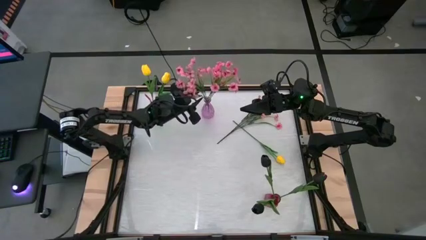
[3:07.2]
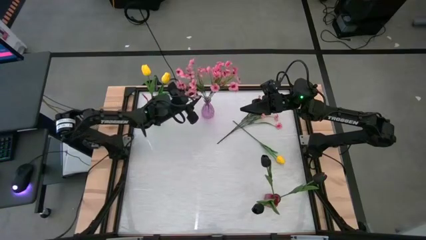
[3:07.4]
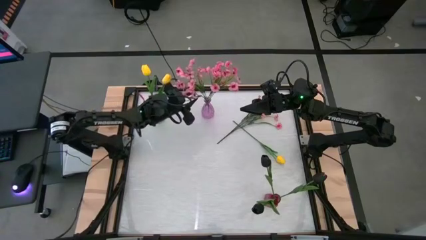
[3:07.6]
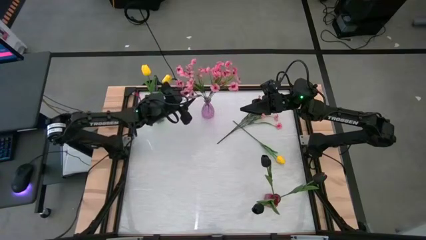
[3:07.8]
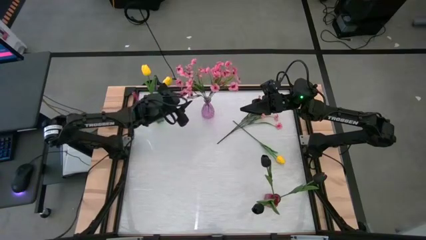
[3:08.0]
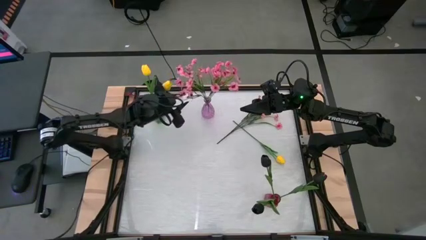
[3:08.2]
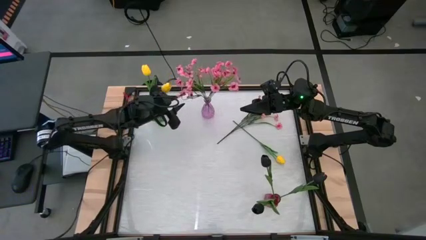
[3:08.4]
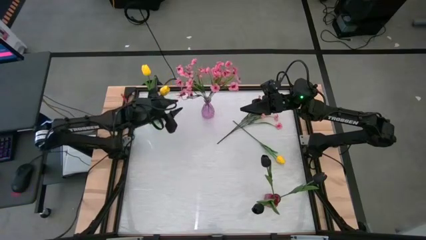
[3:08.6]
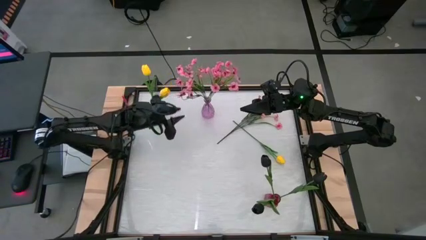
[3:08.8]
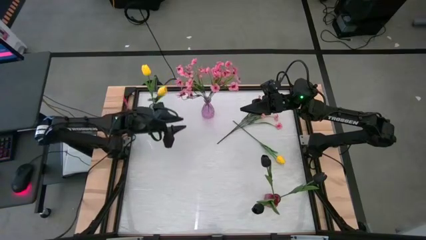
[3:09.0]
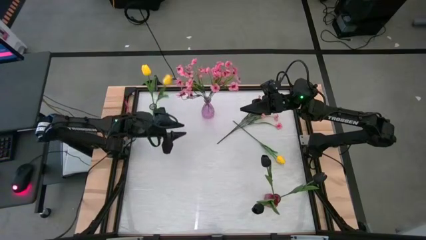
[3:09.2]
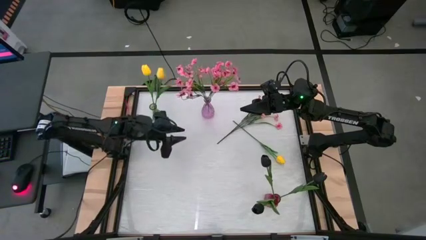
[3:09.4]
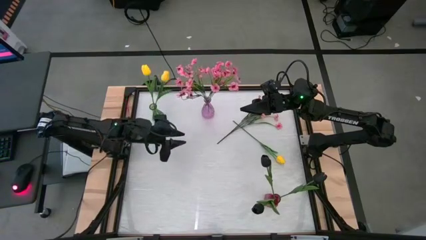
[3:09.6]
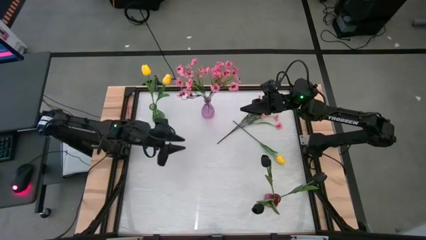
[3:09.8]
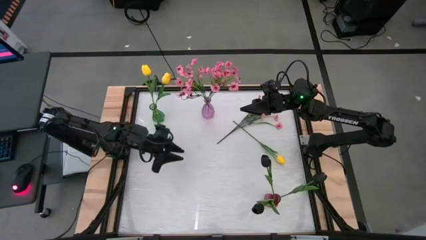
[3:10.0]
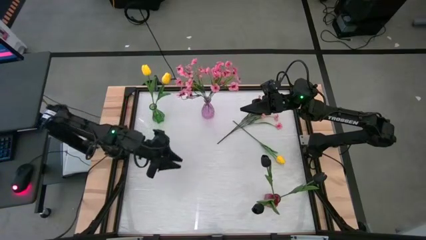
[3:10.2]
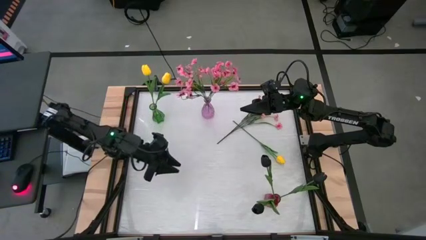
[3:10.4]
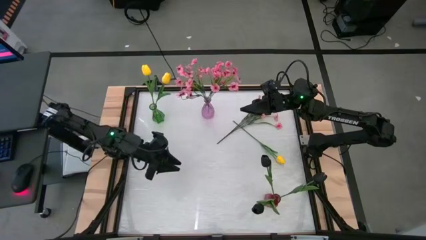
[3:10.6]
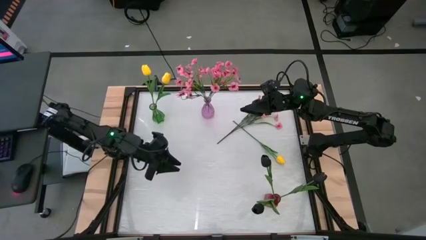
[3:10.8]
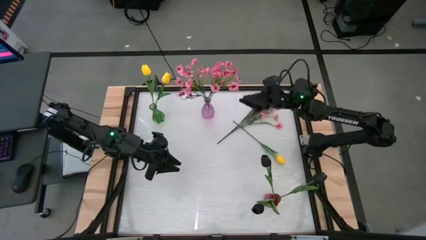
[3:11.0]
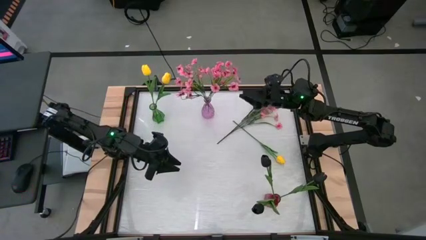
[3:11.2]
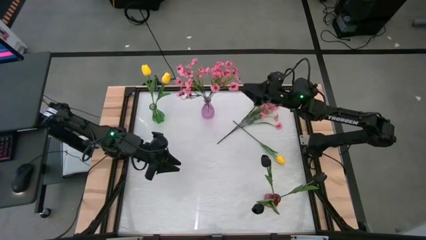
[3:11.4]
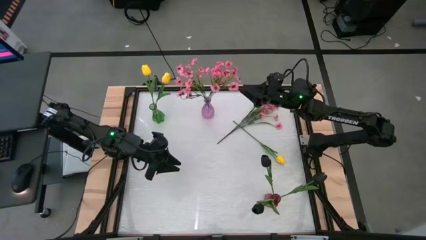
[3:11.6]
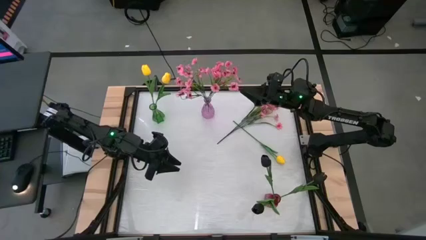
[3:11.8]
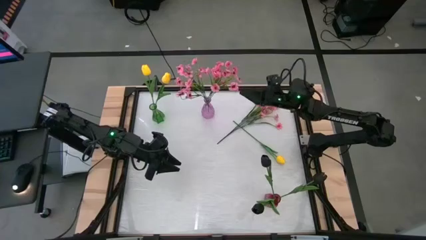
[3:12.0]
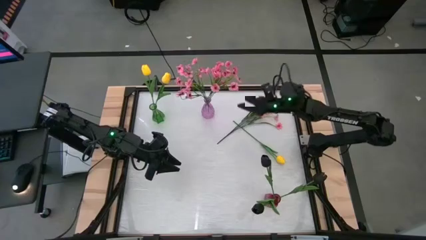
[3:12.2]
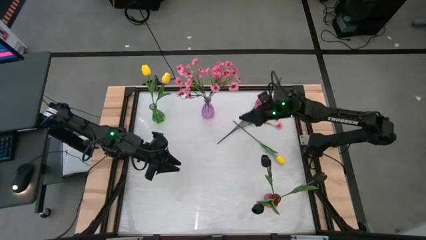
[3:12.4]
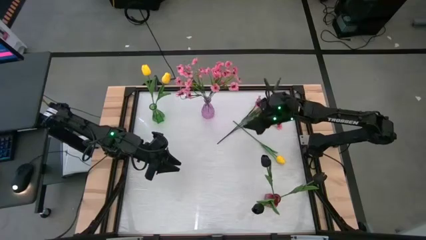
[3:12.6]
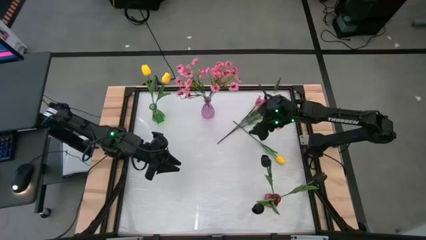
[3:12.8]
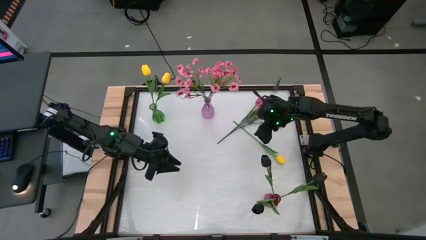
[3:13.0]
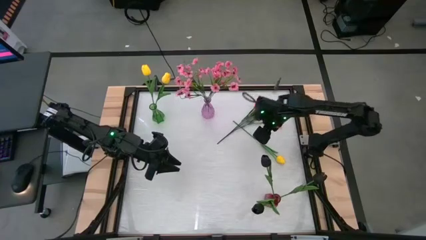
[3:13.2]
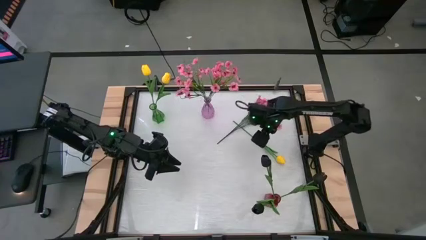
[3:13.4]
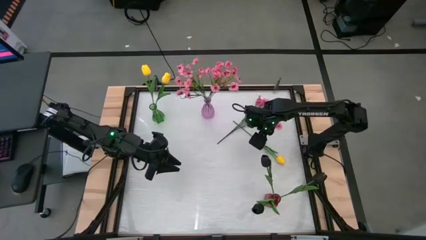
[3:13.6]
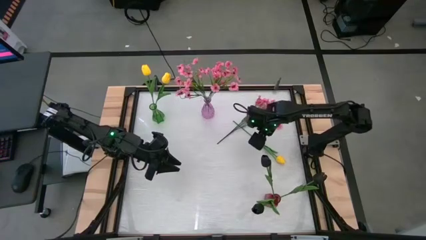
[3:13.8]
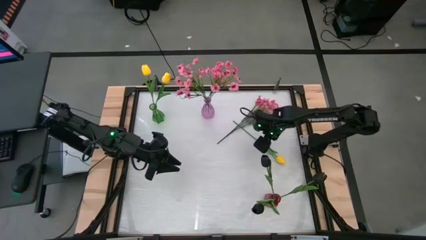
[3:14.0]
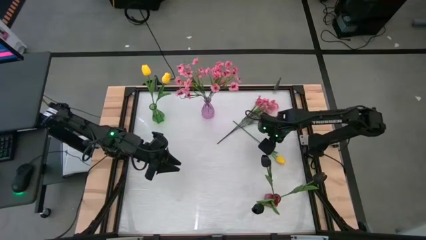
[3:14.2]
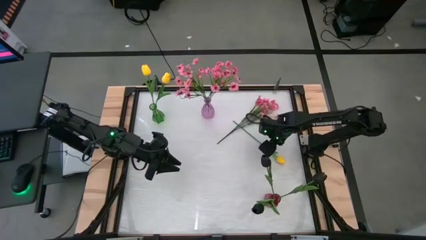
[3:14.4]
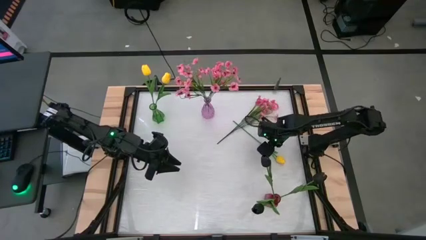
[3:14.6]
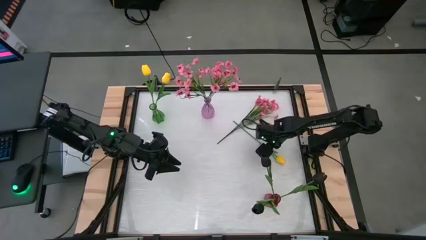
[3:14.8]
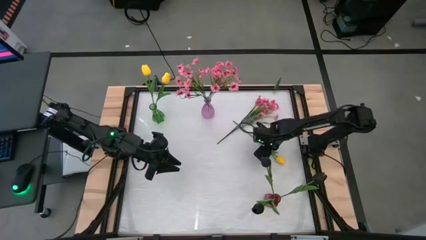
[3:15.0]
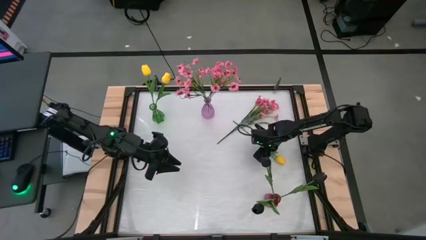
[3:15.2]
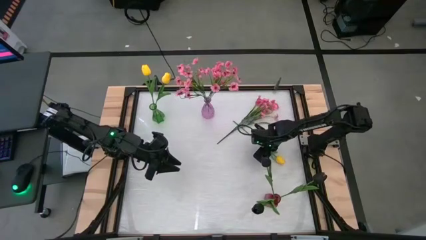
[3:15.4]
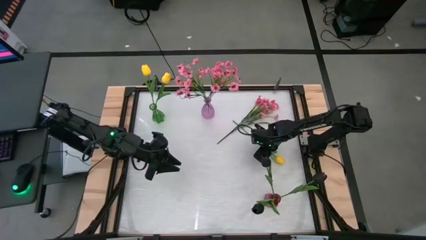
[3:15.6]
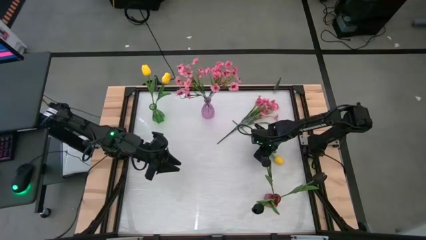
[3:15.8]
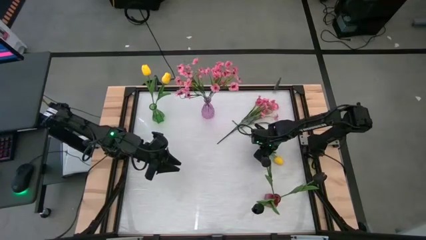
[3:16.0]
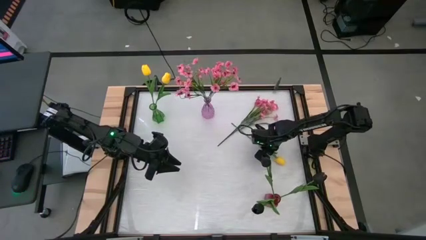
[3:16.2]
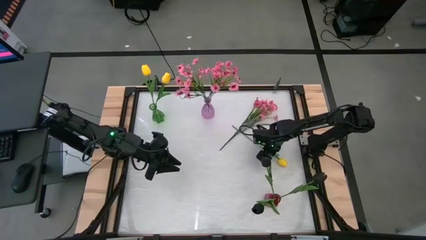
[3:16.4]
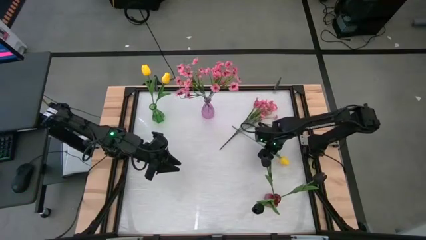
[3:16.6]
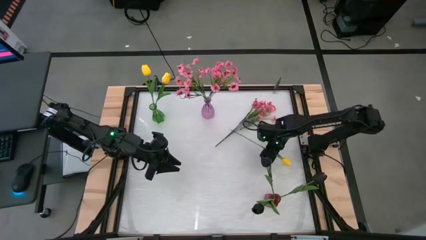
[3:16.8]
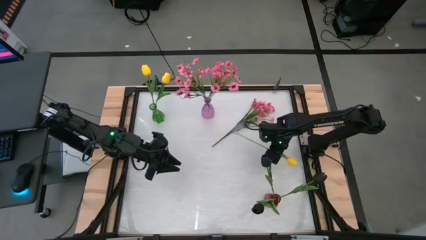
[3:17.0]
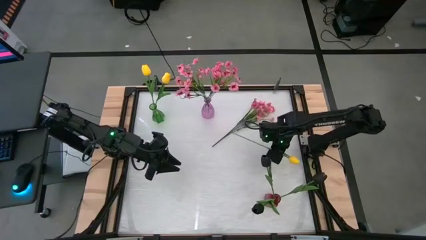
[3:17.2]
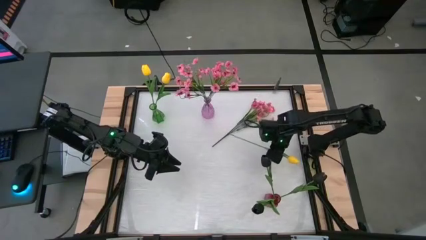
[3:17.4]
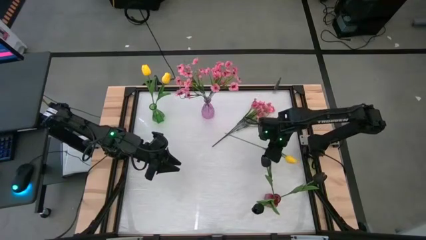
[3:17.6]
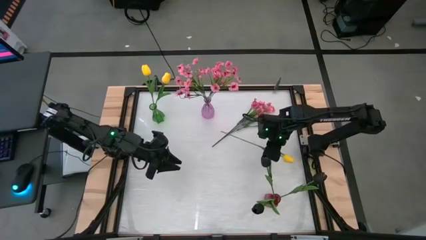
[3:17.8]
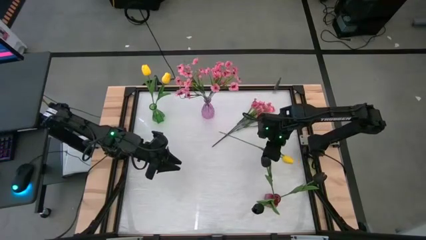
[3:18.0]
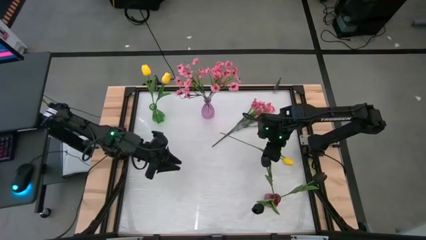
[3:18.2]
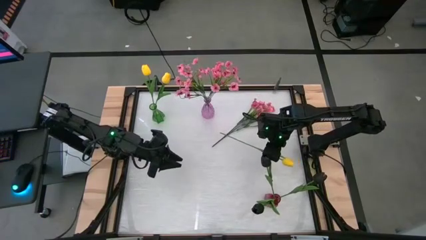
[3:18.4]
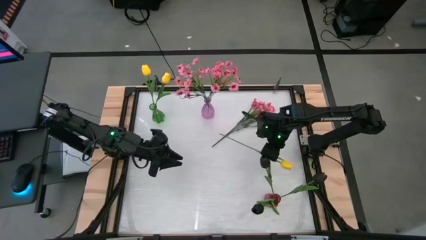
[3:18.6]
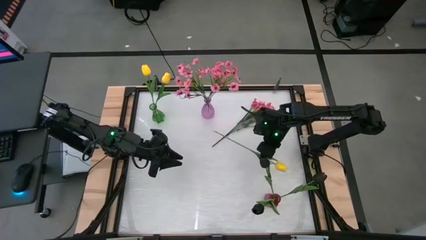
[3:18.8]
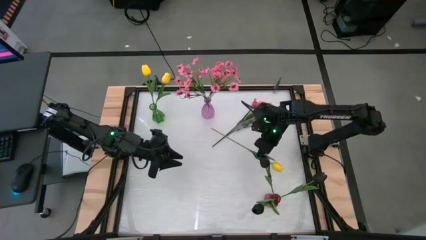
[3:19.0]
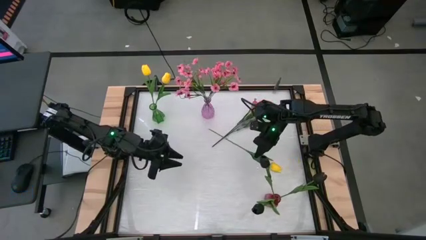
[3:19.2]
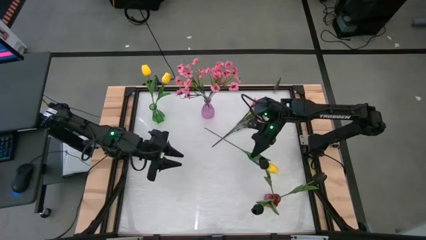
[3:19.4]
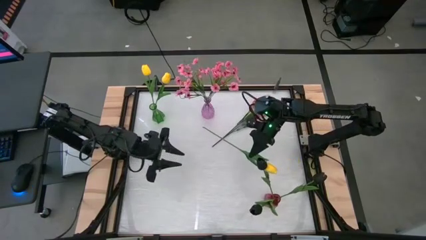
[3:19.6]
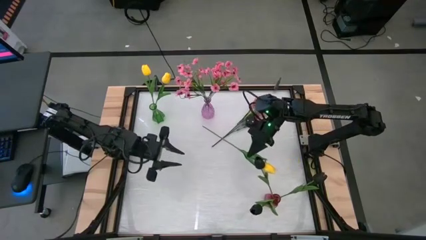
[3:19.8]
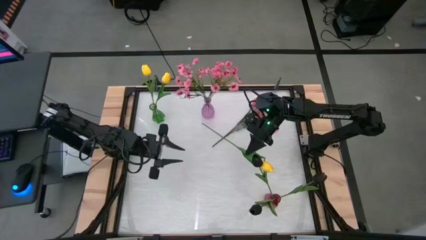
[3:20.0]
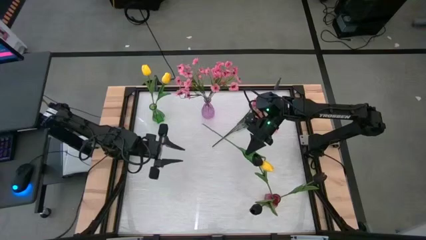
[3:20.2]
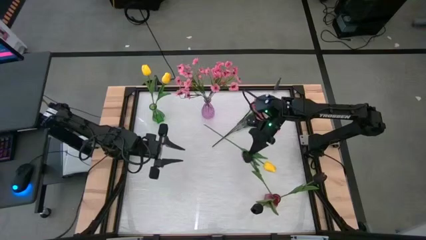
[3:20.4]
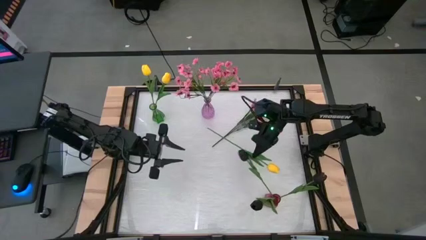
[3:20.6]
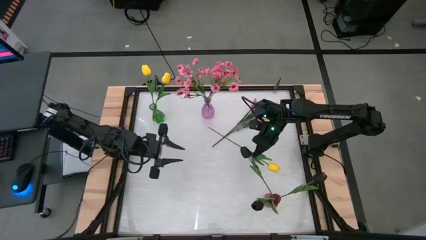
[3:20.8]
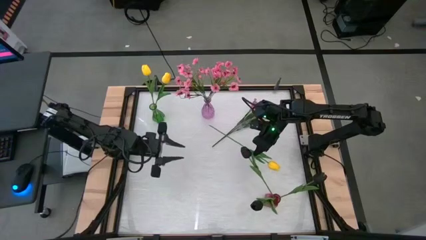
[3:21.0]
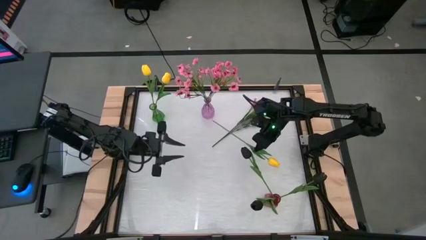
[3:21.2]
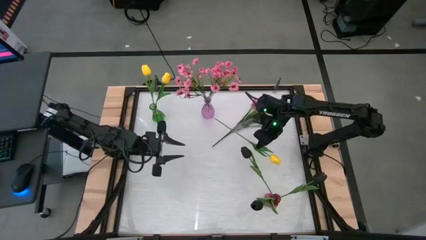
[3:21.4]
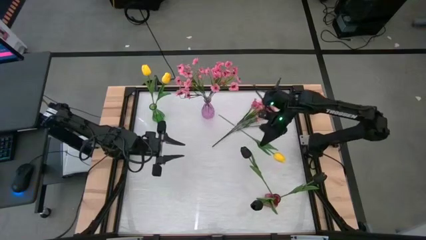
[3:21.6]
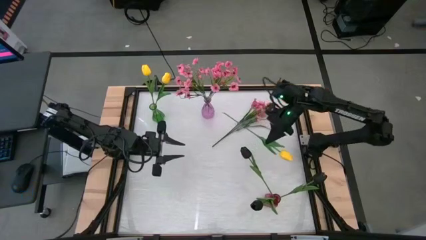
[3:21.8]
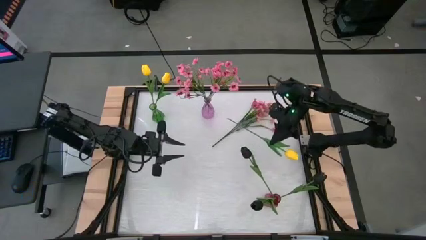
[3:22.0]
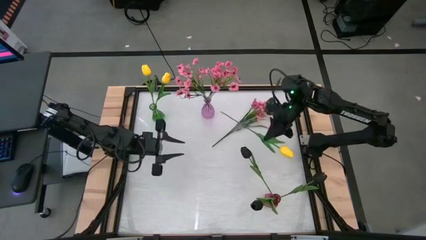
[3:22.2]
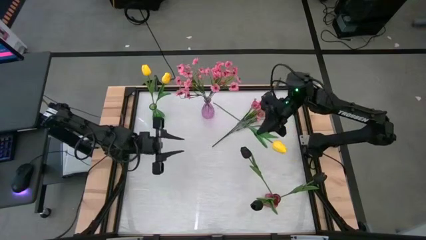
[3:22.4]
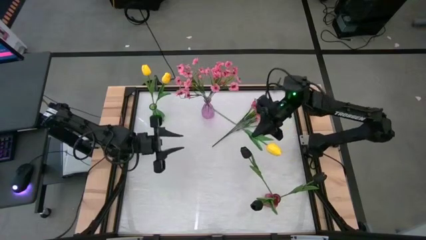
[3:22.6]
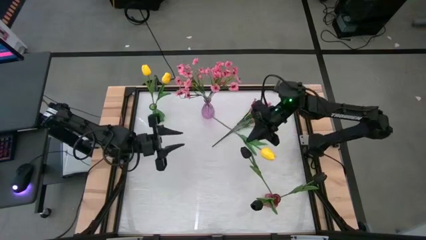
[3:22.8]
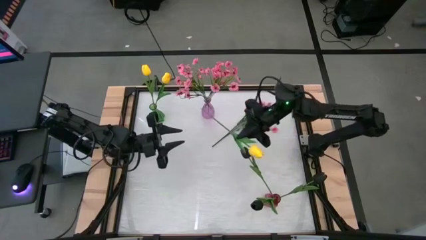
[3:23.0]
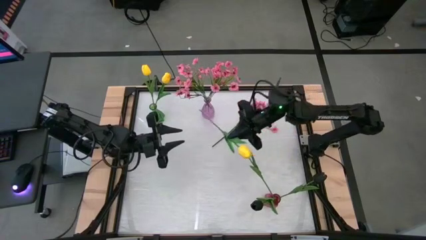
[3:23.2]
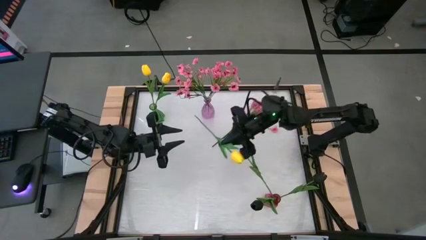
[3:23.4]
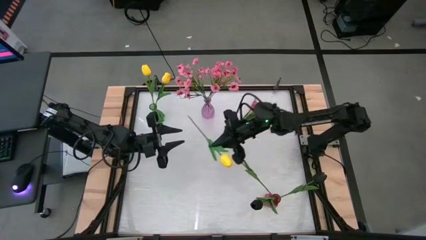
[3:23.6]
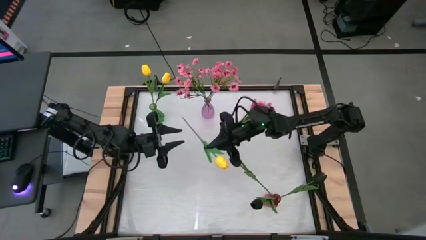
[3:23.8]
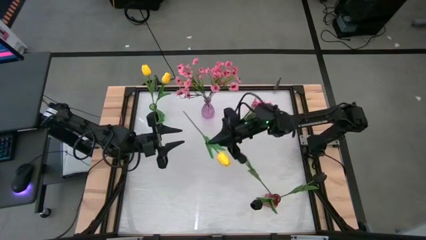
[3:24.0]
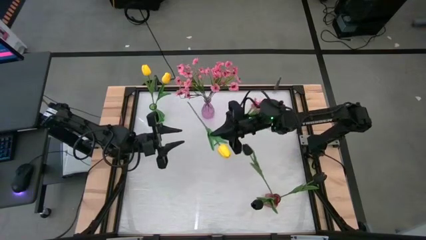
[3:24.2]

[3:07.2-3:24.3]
Task: Sort flowers into vase by color
Put the yellow flower into the green vase

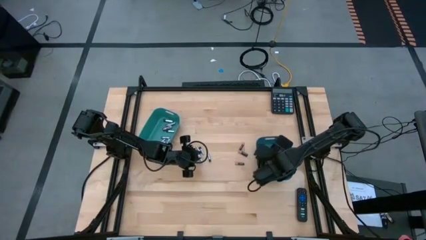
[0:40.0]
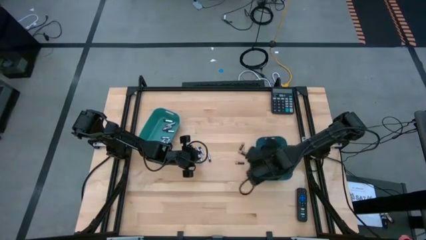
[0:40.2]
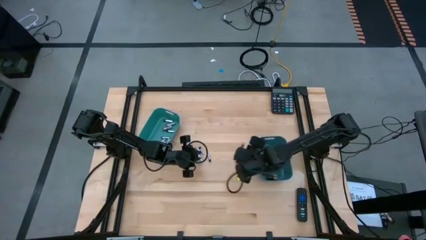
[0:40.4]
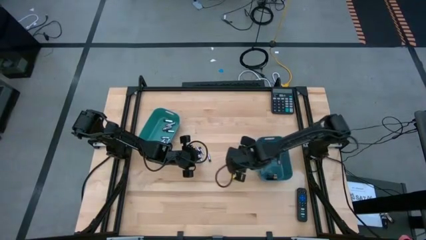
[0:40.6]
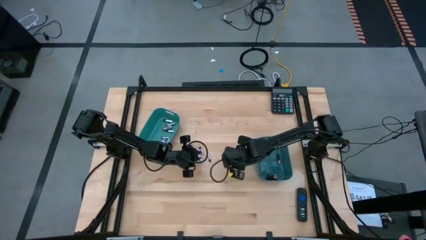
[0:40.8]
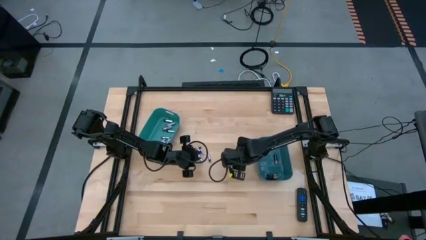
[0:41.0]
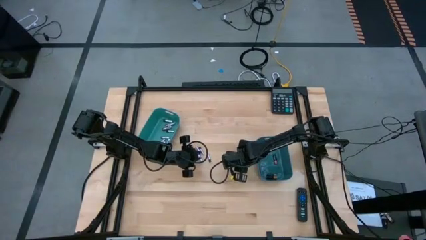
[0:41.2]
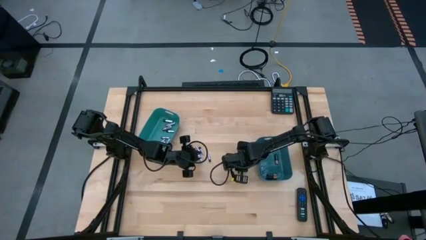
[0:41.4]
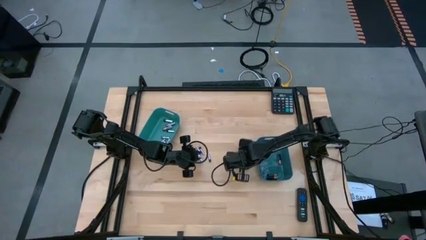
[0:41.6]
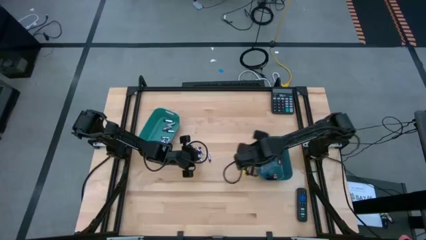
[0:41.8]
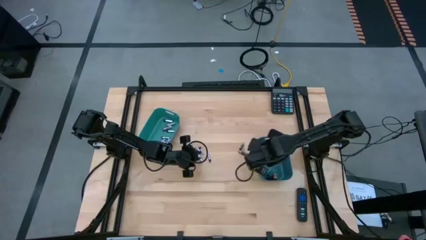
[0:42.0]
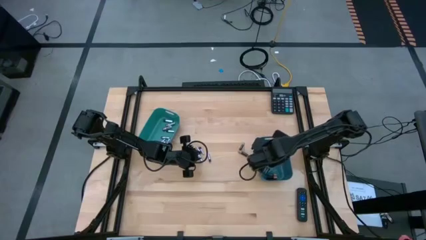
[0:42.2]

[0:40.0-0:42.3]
Task: Sort batteries
Put the black battery into the blue bin
